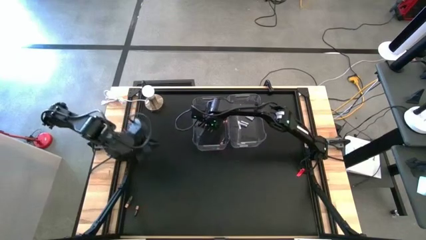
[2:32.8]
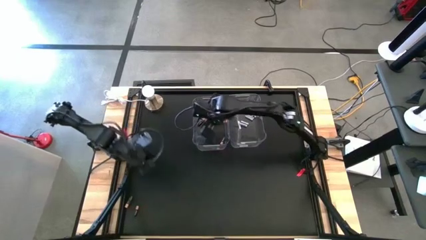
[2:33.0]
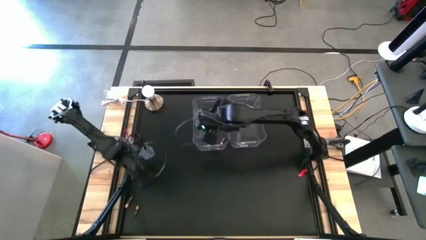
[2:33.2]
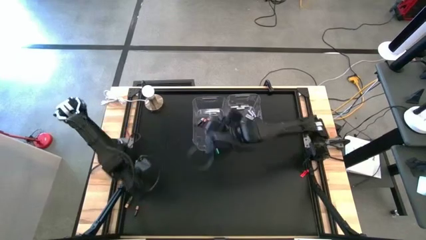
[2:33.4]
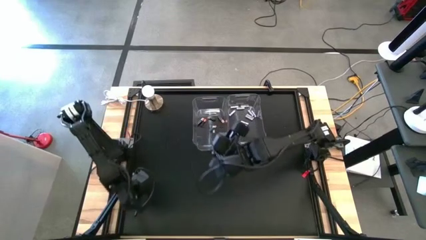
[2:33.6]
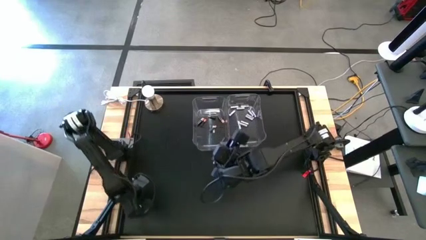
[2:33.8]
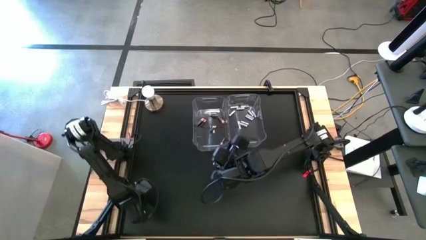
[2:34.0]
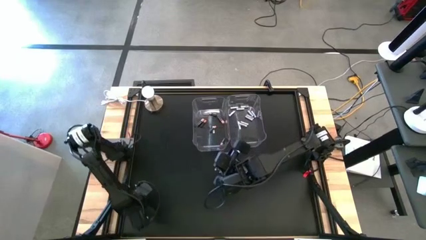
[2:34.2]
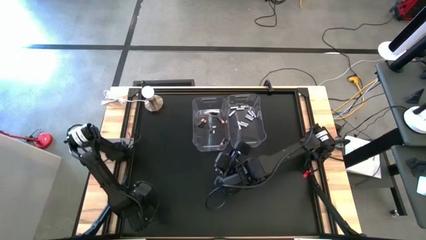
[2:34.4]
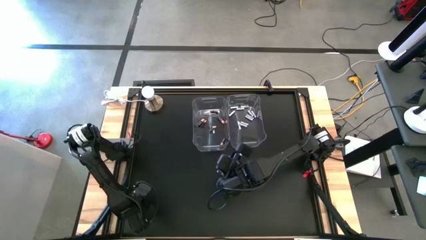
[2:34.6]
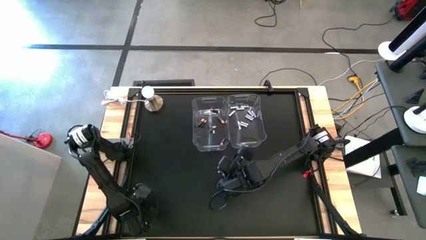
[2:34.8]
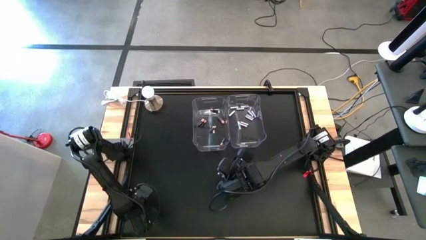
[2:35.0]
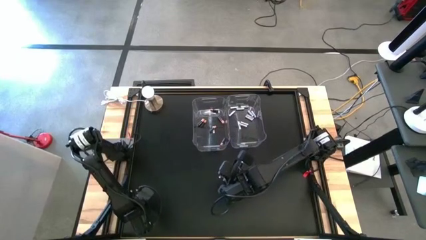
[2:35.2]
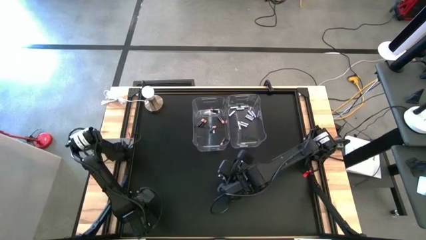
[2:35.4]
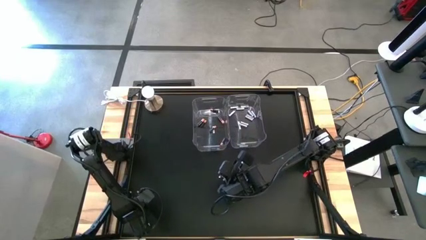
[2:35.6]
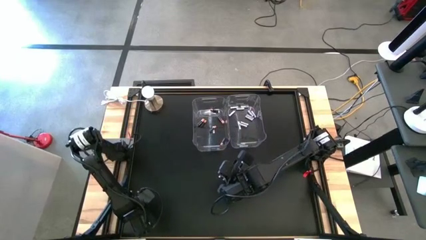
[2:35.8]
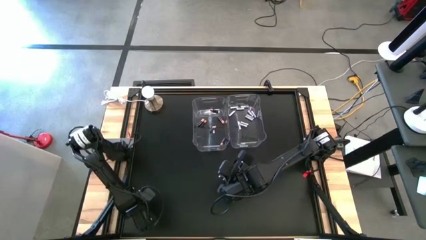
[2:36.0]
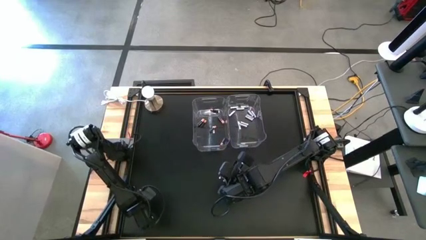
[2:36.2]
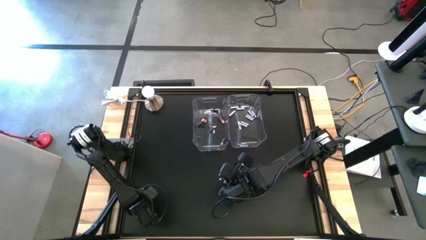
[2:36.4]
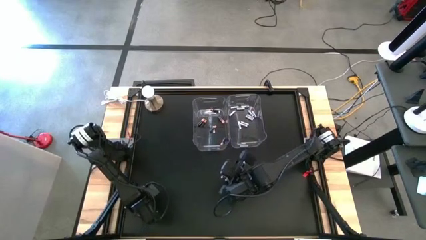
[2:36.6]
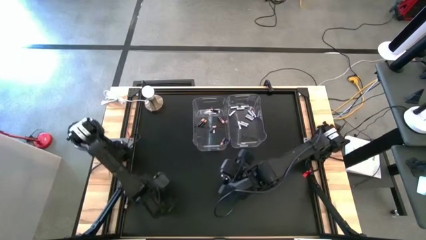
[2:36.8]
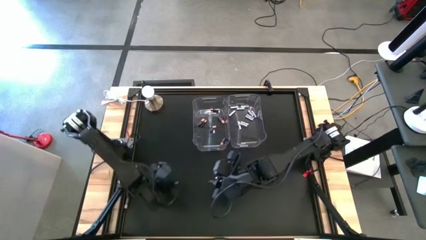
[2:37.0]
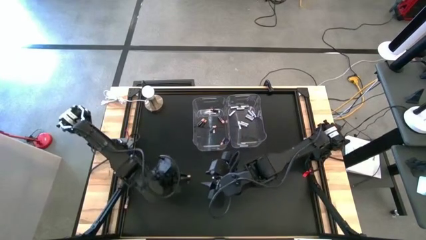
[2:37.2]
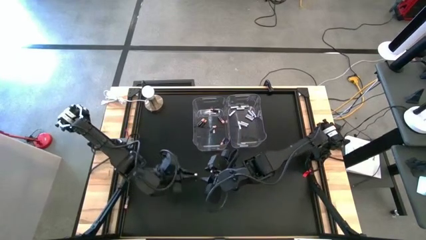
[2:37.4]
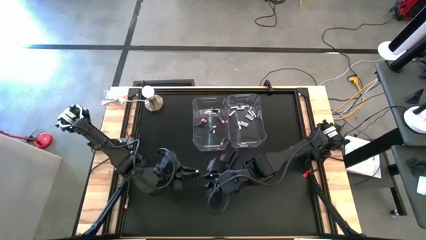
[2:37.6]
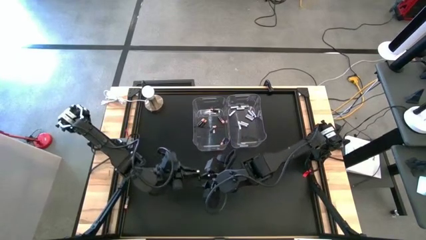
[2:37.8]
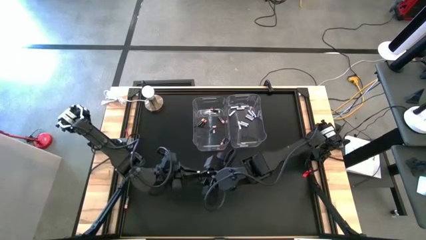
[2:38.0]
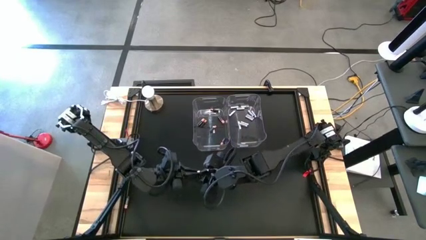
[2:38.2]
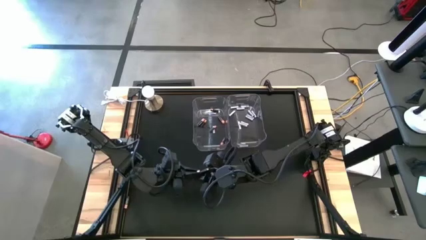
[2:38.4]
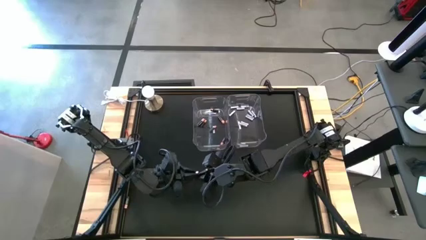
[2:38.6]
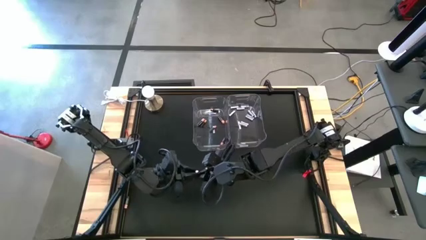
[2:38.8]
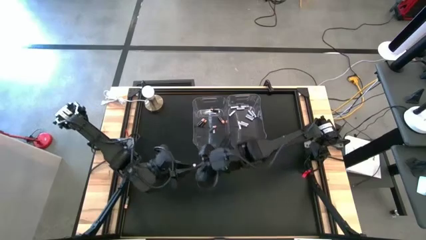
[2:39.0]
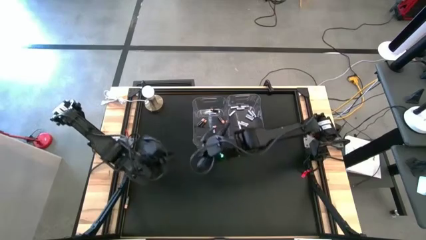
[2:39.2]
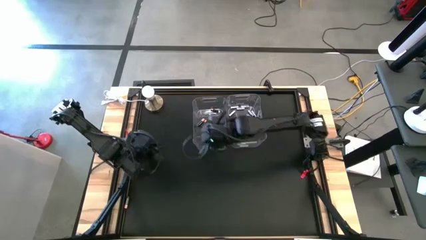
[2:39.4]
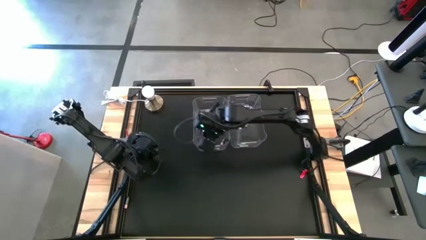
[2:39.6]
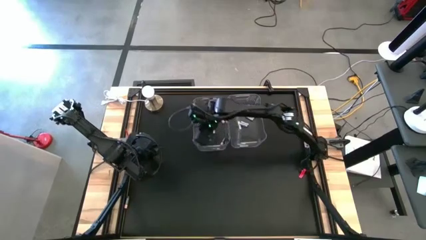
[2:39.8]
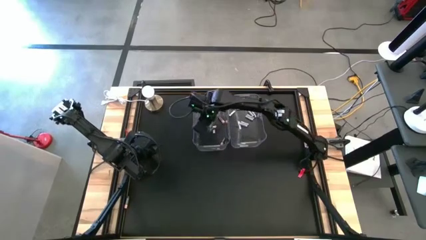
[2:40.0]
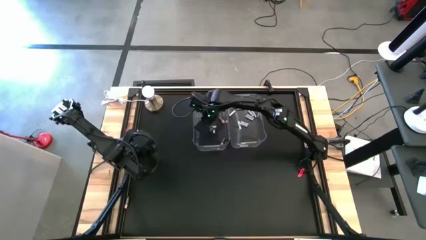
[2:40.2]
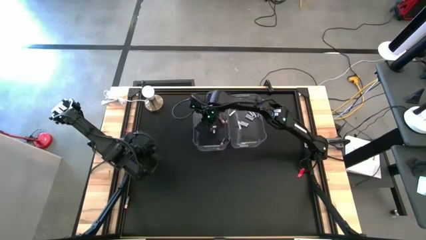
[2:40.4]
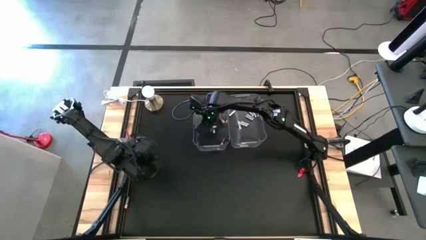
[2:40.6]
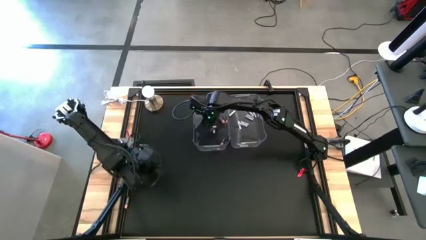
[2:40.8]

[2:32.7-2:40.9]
Task: Sort batteries
Put the black battery into the left transparent bin

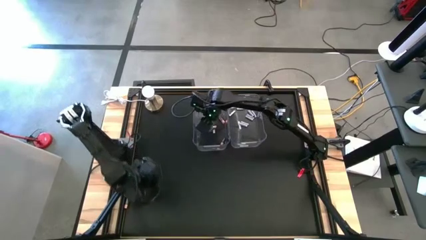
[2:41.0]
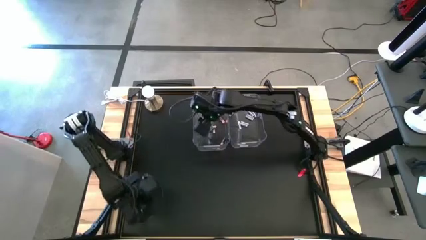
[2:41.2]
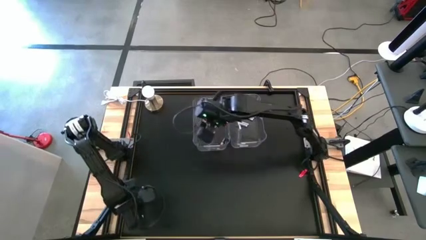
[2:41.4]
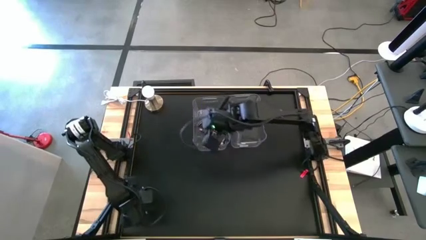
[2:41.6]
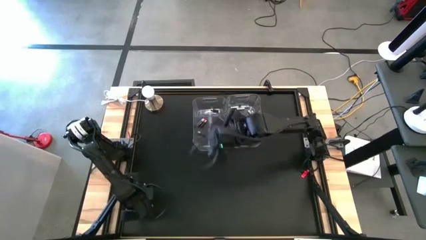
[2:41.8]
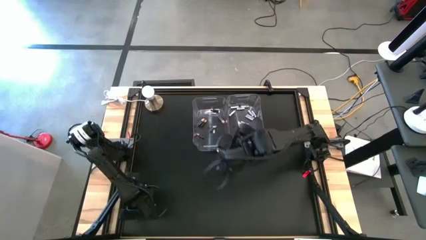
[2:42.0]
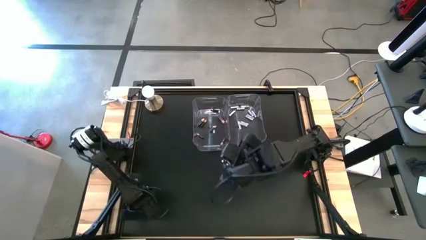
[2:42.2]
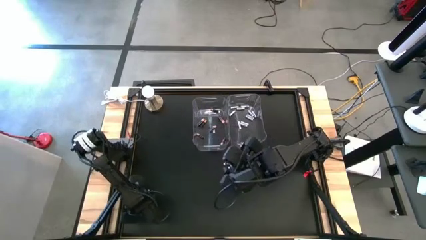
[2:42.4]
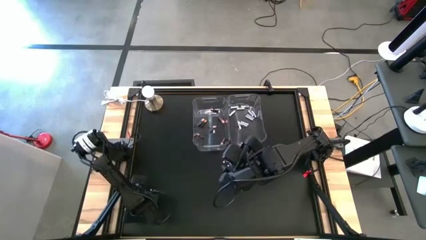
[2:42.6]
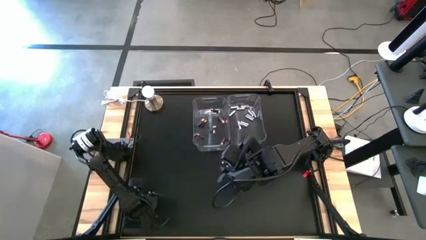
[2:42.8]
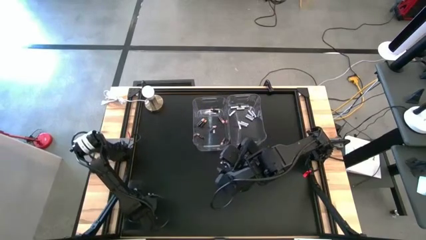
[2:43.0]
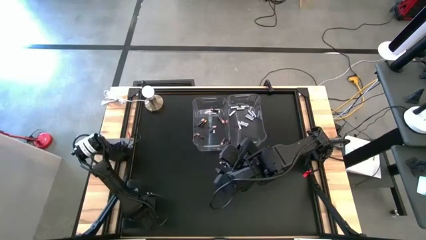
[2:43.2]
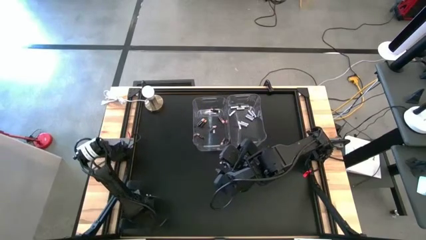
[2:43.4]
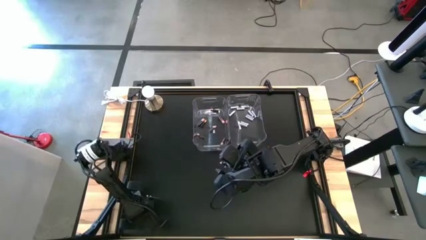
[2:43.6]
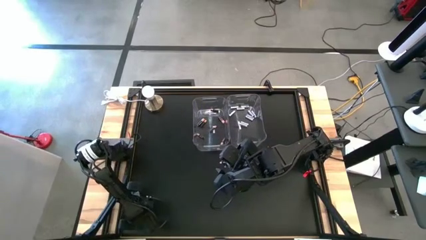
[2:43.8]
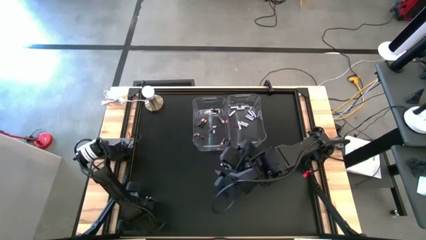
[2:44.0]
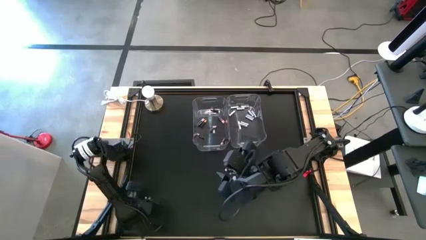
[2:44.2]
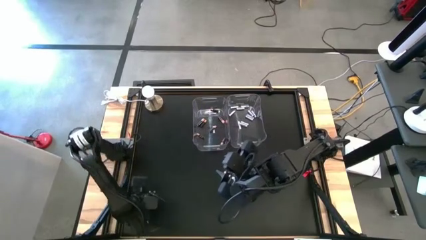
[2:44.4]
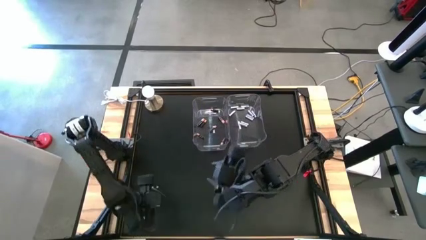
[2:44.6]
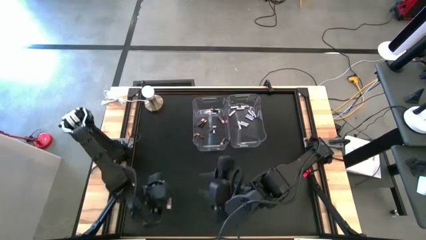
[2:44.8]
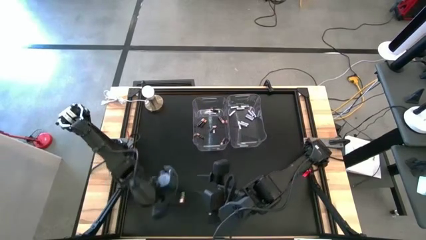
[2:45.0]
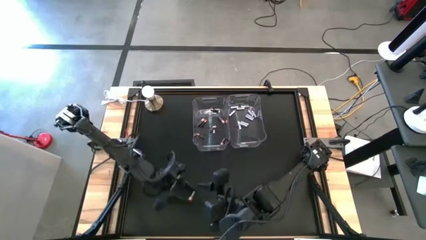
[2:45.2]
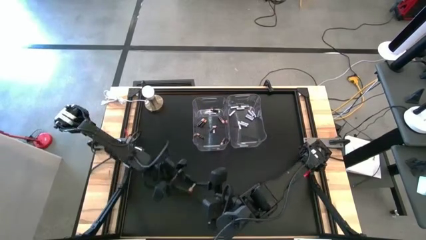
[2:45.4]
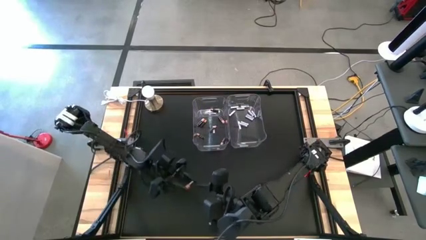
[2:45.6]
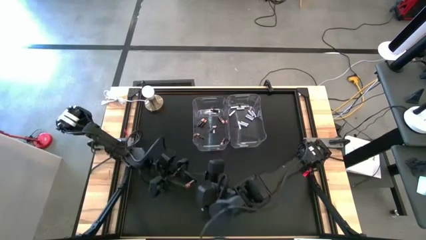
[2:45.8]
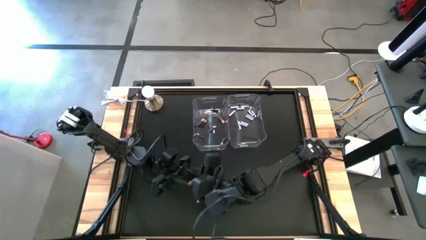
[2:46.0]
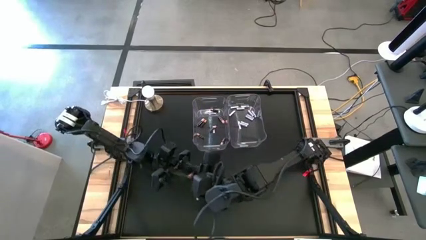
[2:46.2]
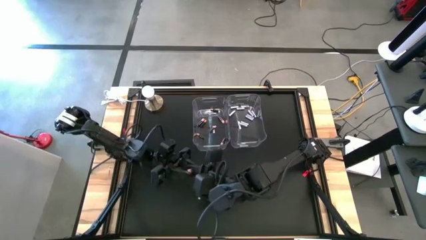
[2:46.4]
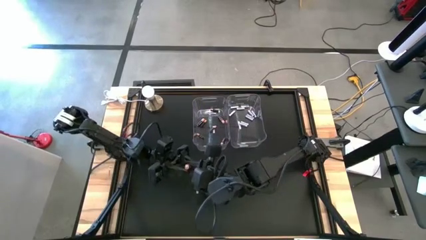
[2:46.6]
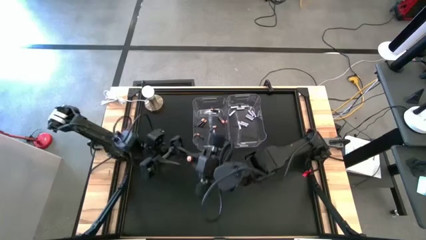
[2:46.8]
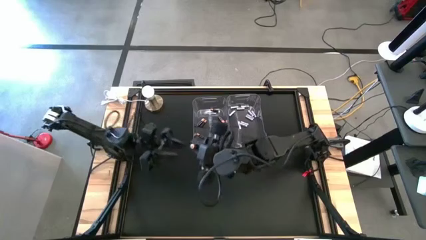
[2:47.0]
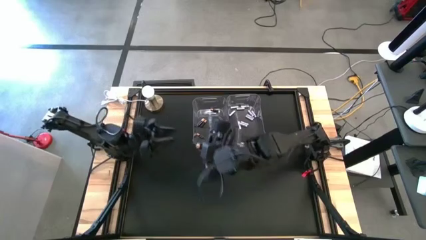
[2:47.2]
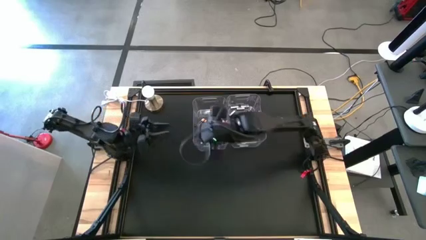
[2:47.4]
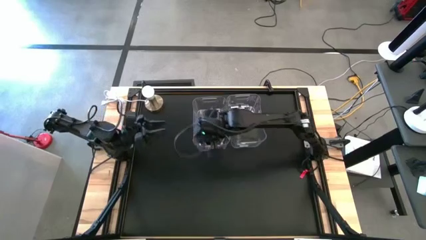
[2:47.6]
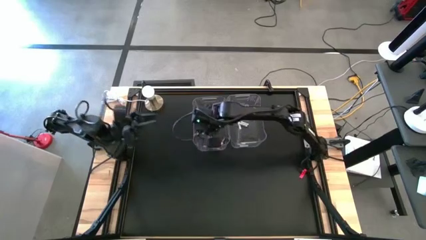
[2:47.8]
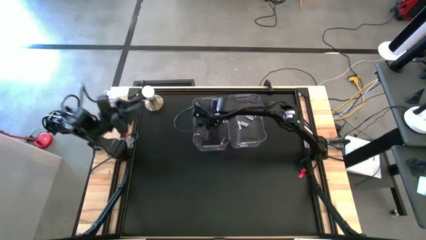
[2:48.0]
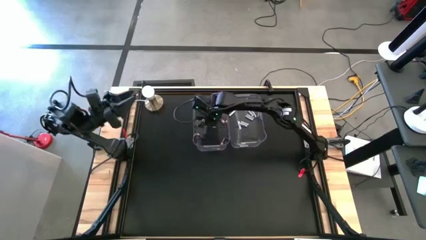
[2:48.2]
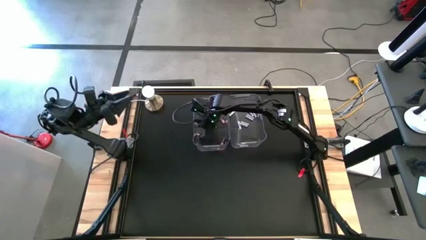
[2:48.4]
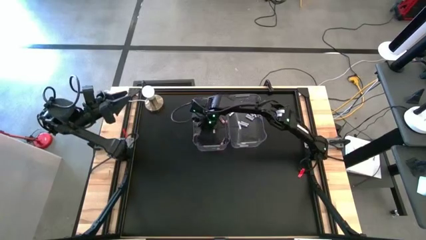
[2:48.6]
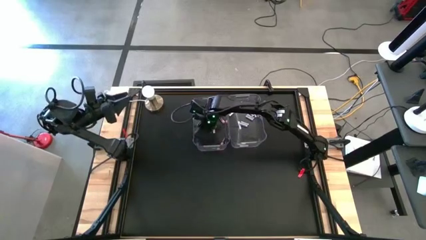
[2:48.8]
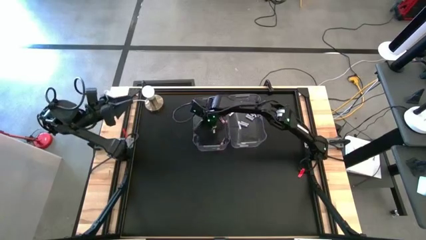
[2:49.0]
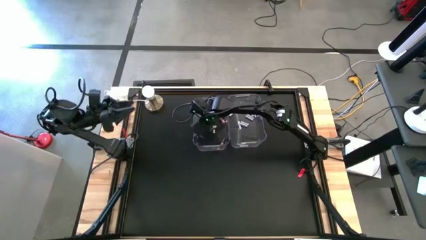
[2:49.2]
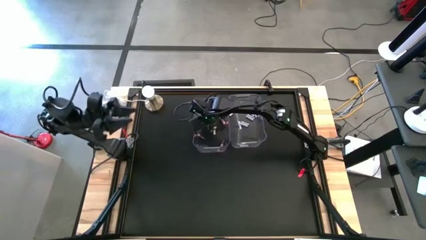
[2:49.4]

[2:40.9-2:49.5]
Put the black battery into the left transparent bin
